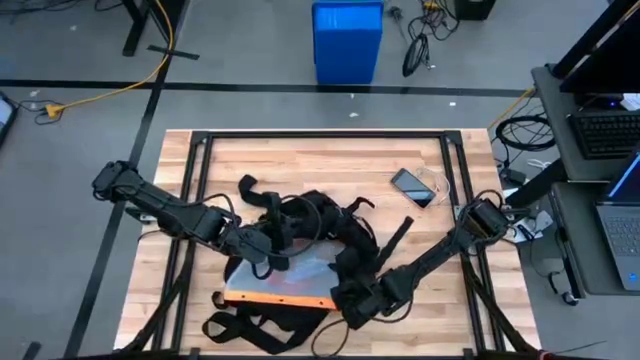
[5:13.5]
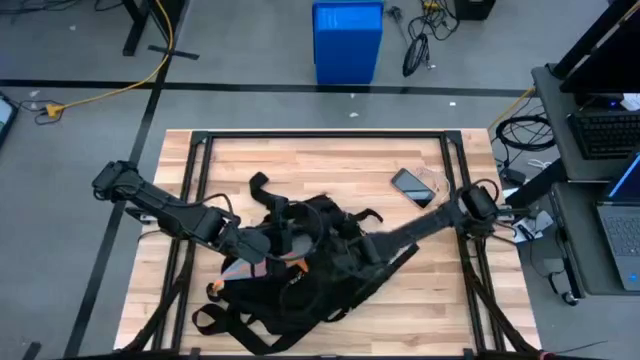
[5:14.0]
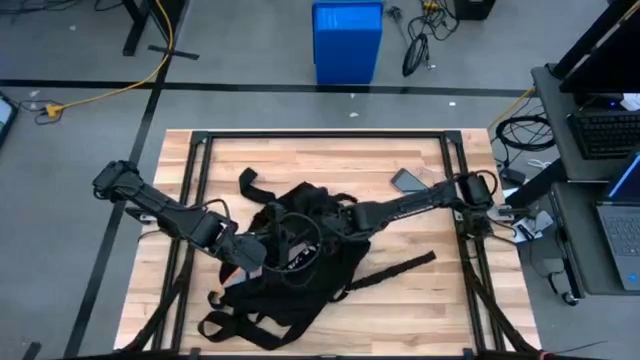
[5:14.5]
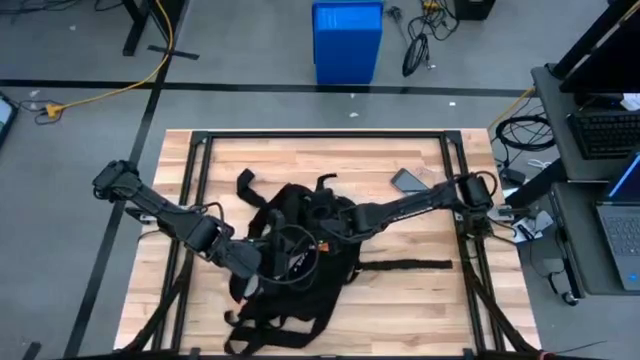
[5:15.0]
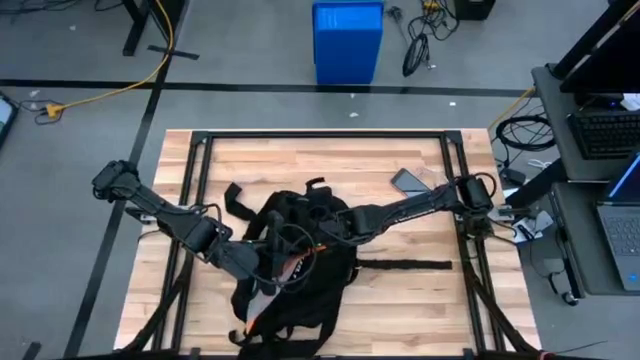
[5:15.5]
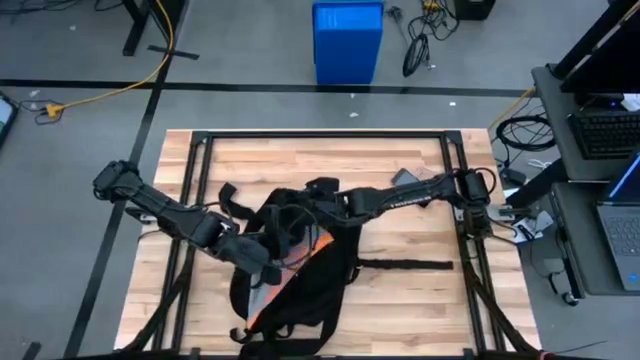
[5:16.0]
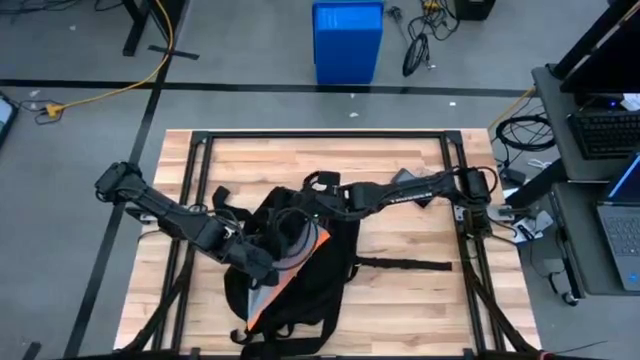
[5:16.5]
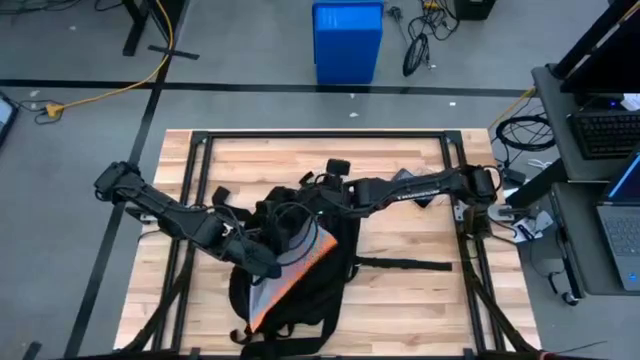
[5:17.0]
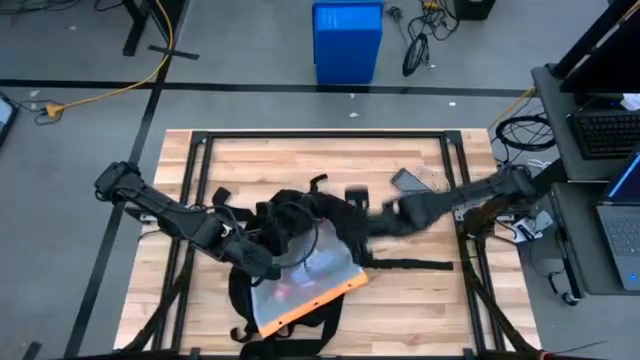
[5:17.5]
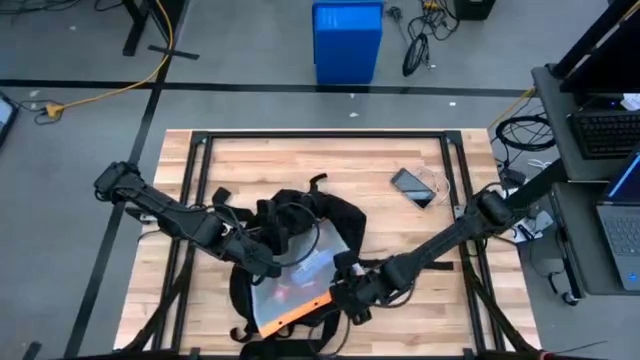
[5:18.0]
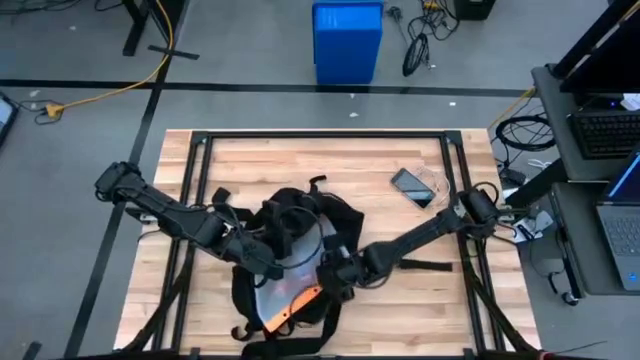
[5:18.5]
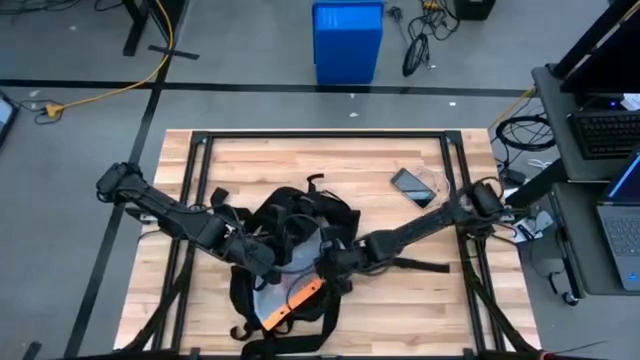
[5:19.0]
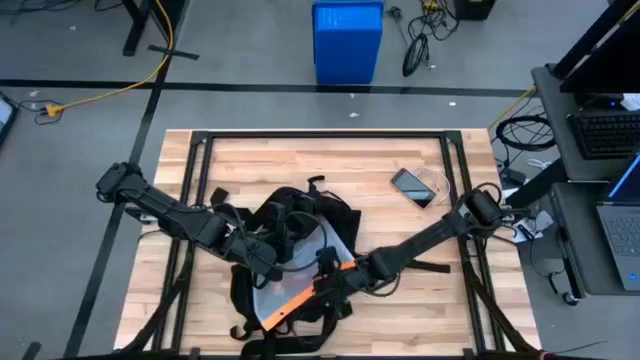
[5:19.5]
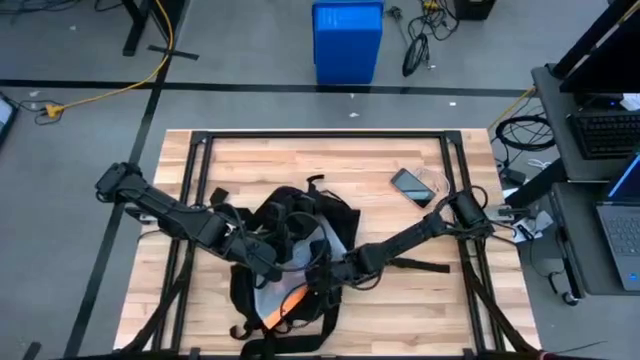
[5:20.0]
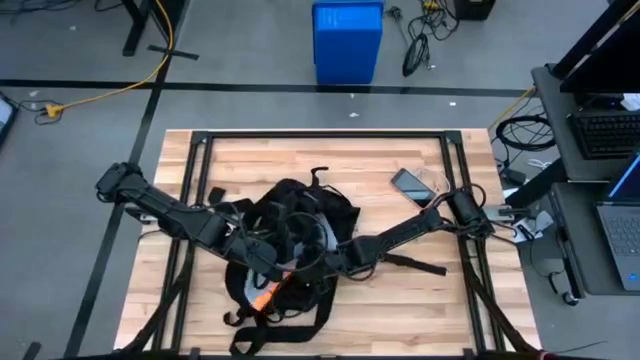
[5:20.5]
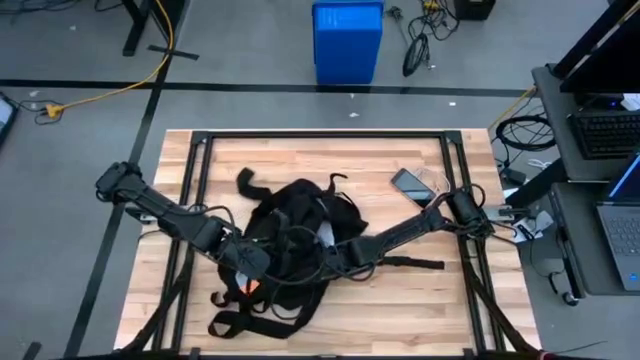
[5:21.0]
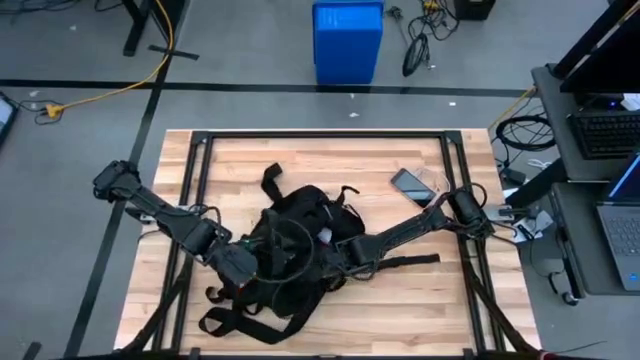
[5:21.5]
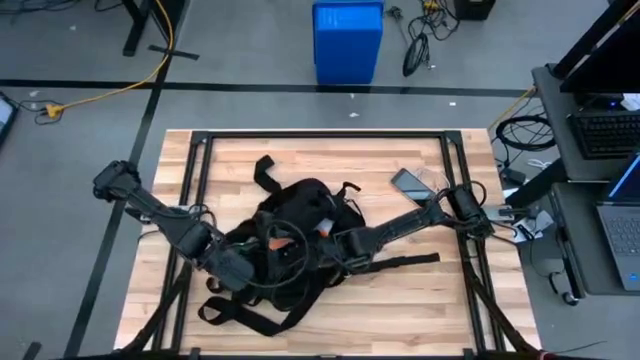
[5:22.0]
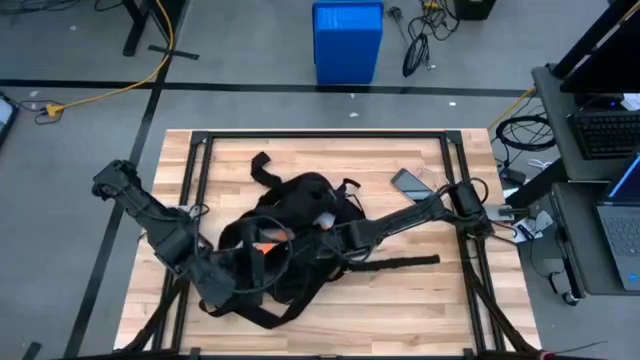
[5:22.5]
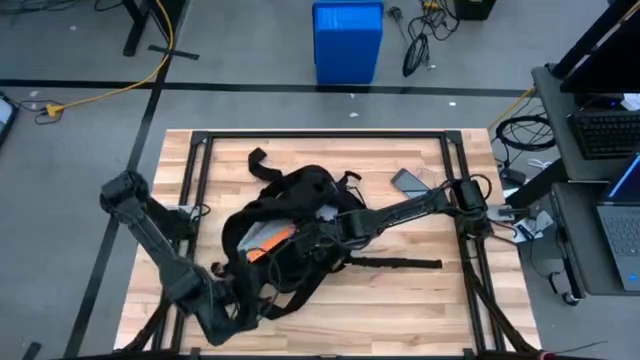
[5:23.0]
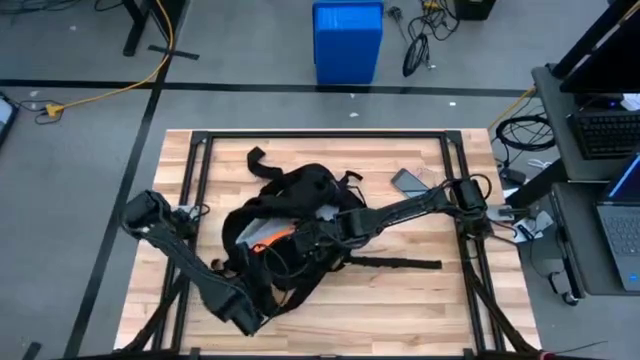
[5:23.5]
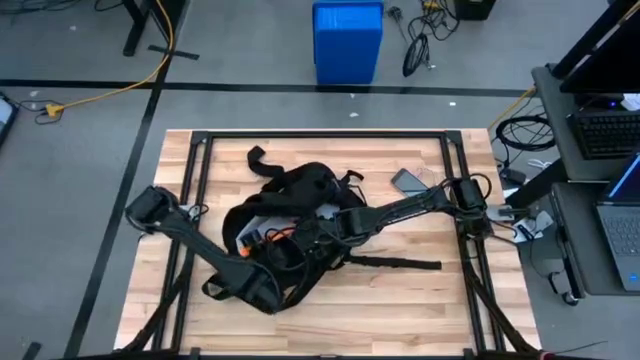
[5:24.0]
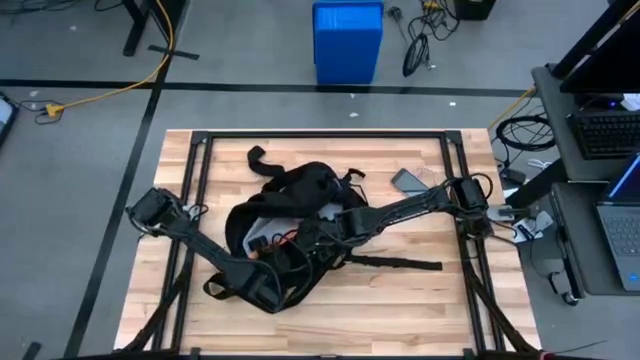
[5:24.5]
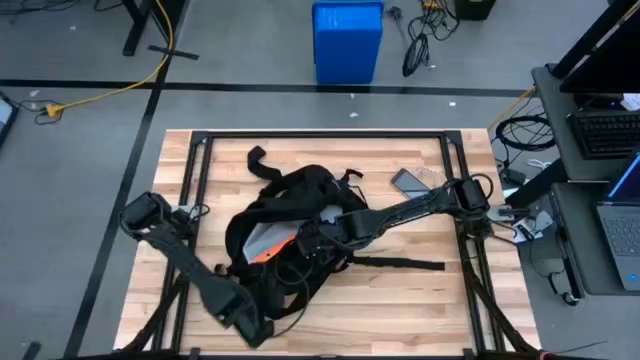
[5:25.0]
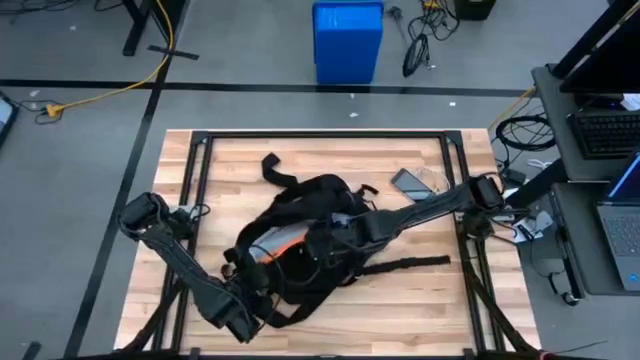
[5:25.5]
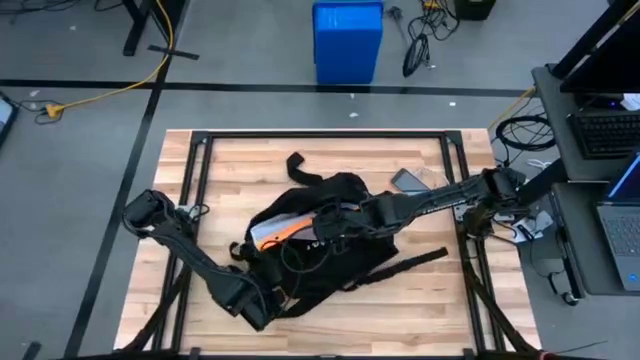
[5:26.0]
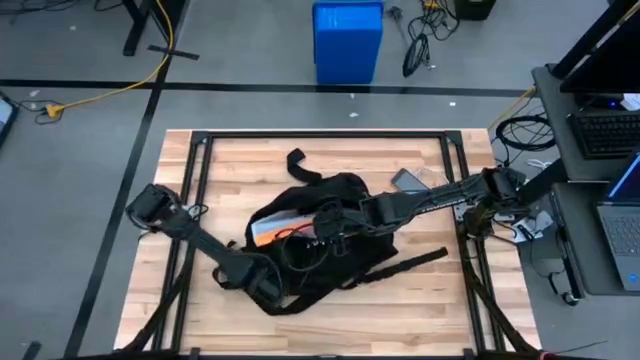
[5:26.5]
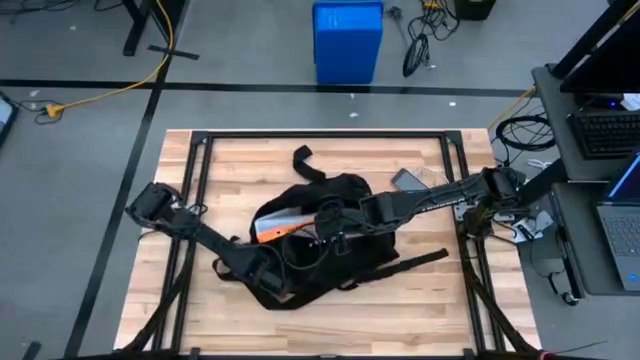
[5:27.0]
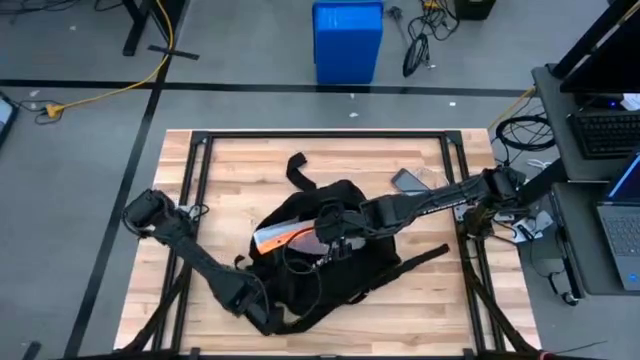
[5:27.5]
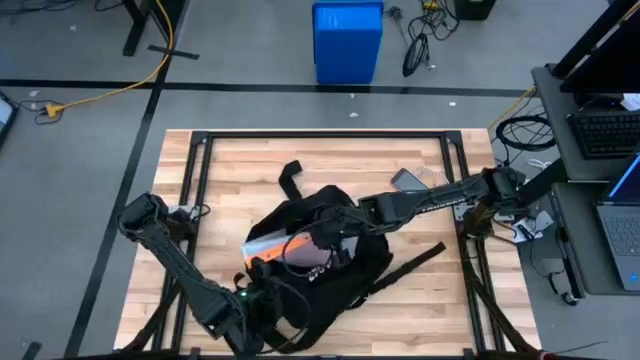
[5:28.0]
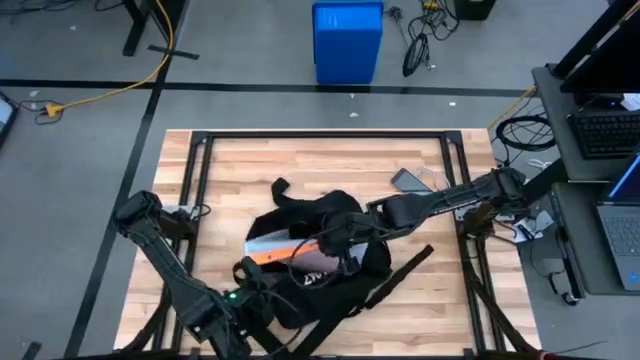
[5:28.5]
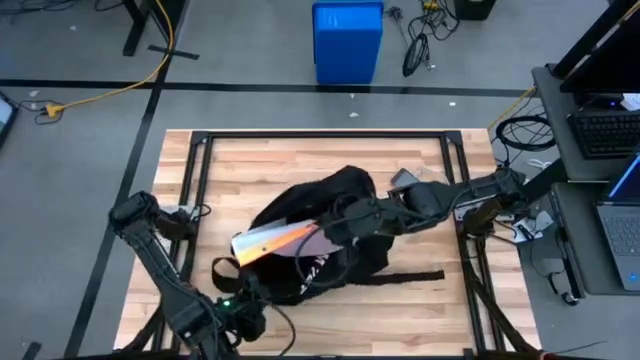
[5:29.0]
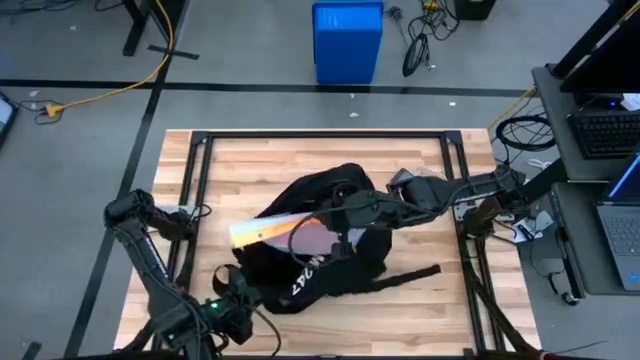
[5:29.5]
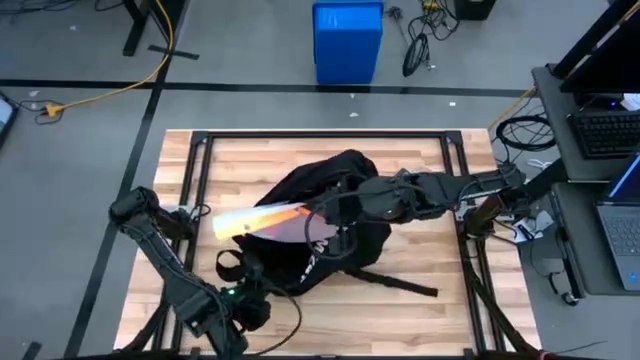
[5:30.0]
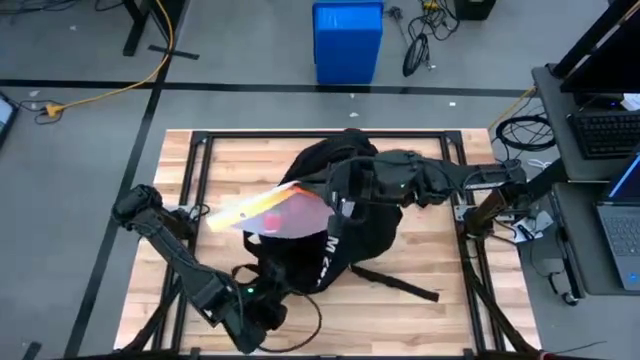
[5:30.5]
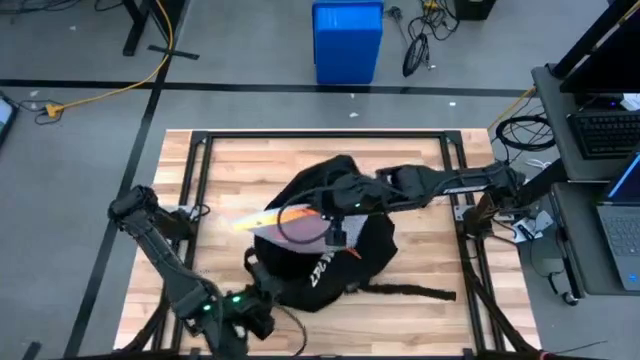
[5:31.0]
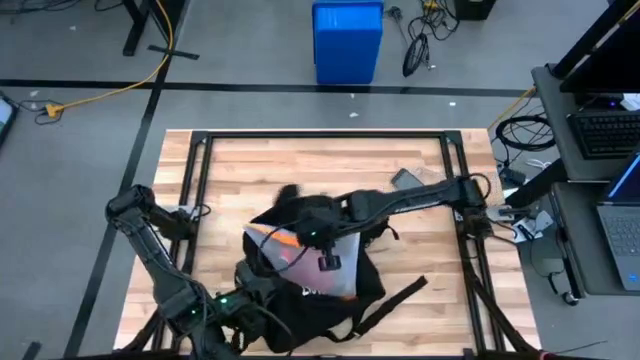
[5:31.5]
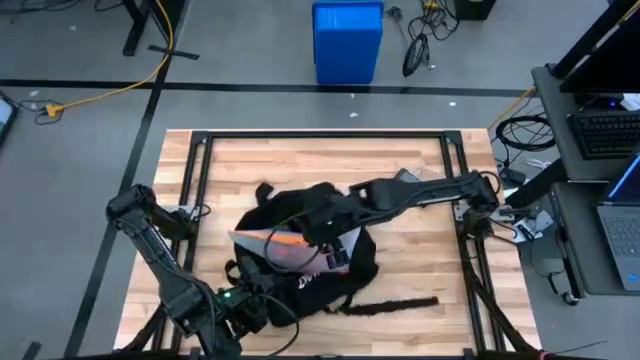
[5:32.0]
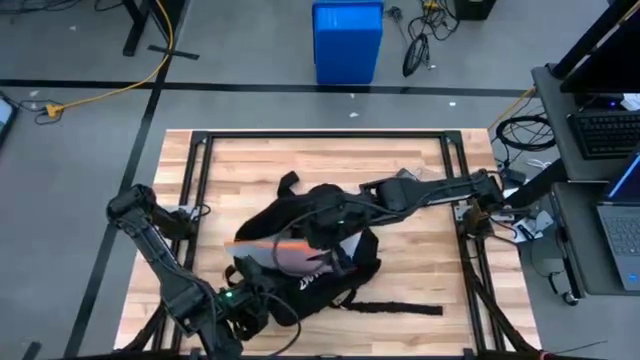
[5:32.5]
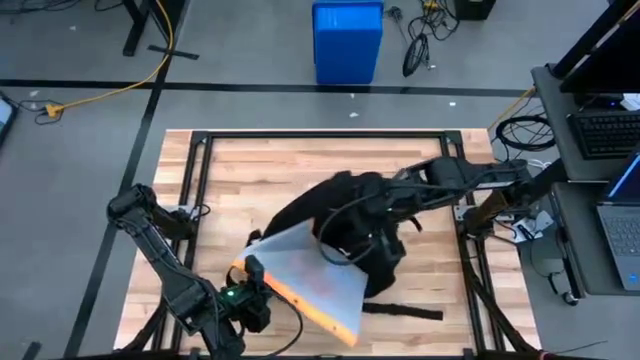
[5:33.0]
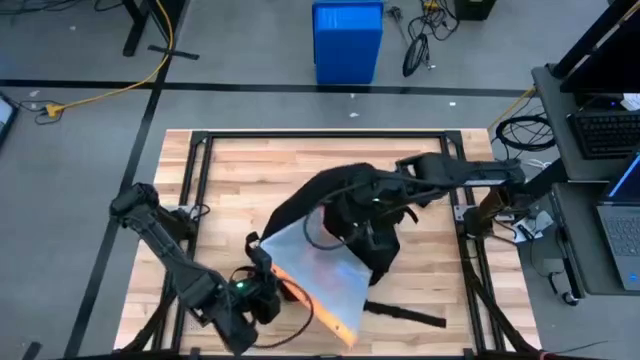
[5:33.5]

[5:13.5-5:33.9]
Task: Unpack backpack
Put the zip bag into the black backpack
